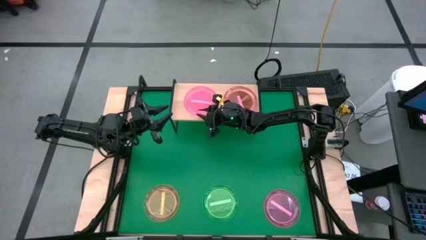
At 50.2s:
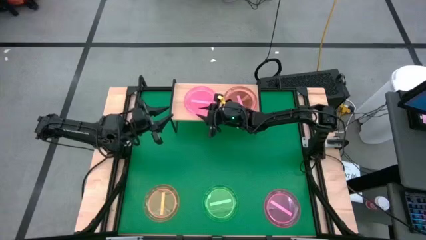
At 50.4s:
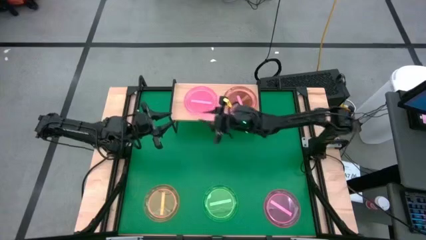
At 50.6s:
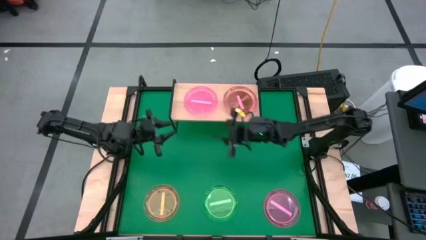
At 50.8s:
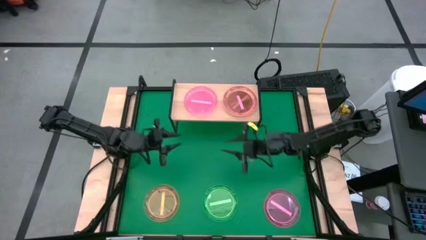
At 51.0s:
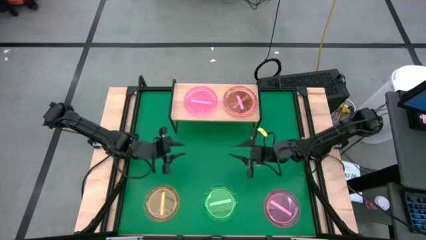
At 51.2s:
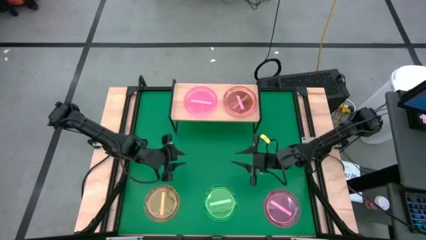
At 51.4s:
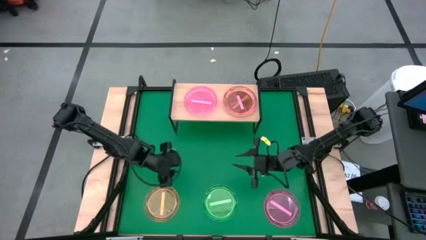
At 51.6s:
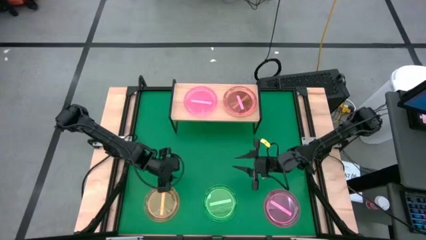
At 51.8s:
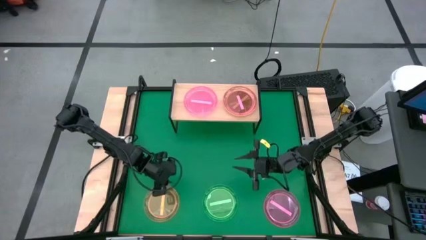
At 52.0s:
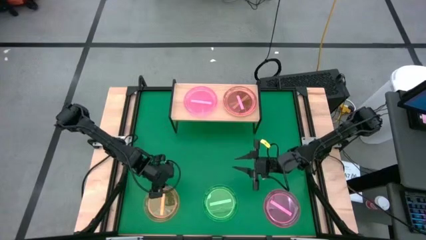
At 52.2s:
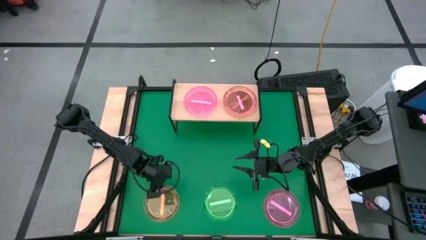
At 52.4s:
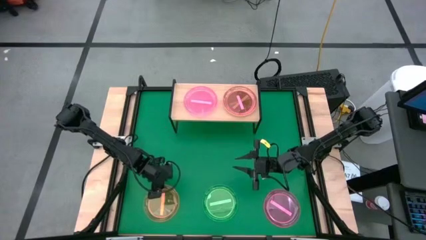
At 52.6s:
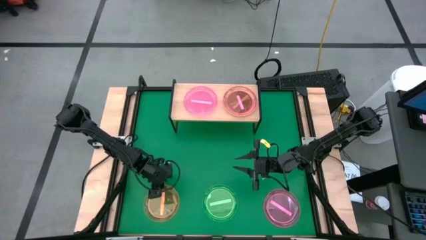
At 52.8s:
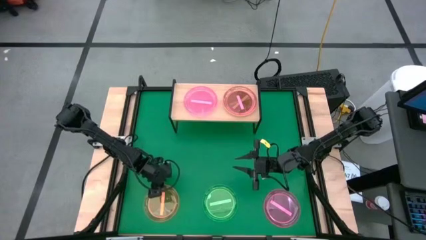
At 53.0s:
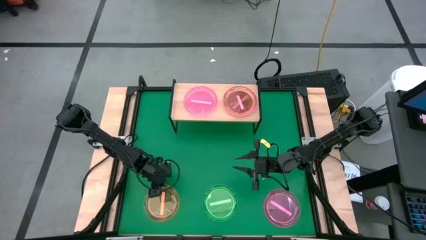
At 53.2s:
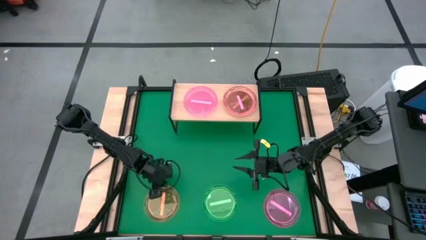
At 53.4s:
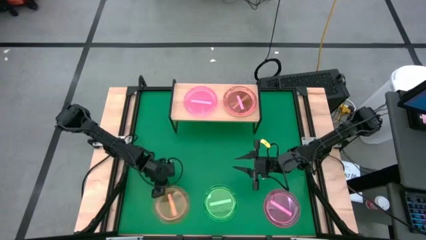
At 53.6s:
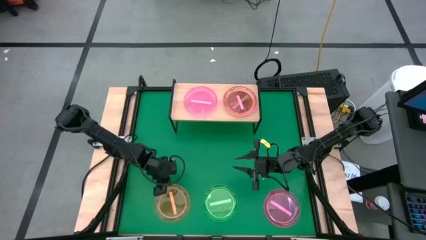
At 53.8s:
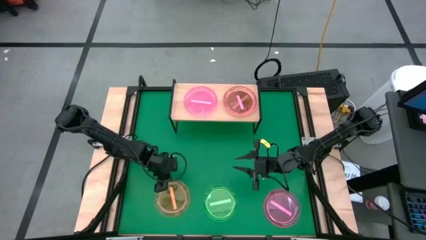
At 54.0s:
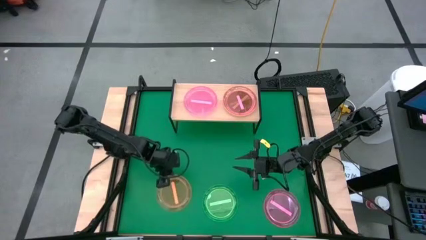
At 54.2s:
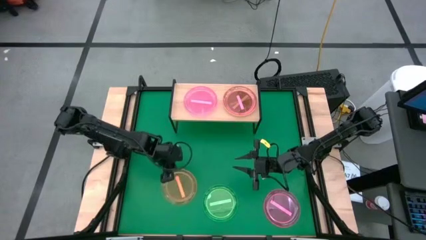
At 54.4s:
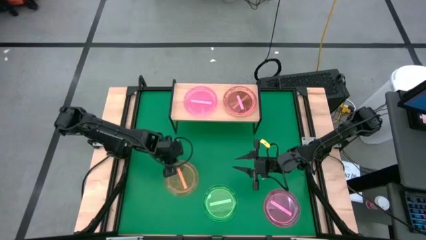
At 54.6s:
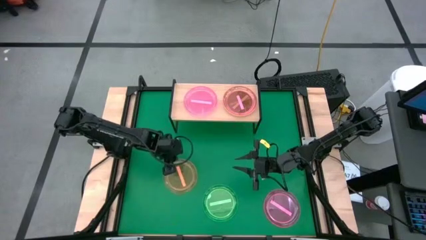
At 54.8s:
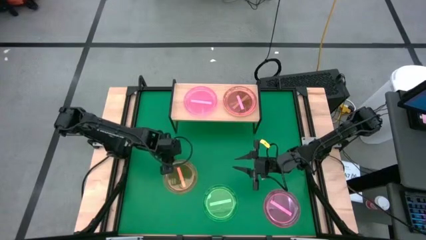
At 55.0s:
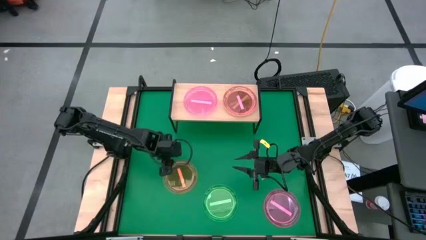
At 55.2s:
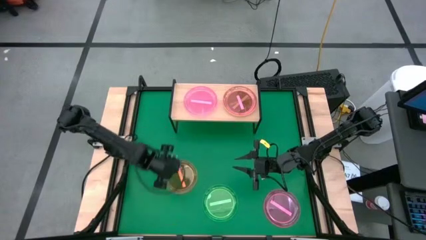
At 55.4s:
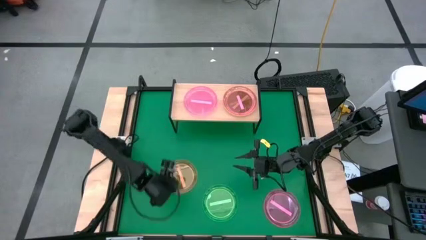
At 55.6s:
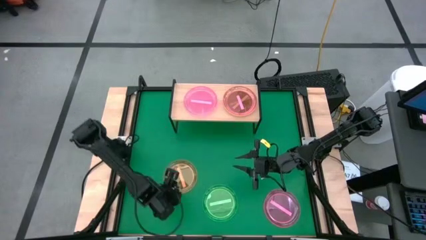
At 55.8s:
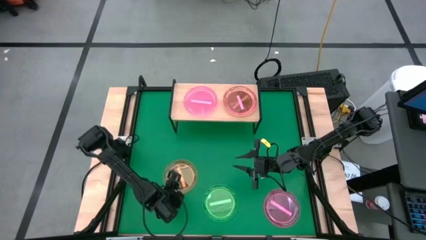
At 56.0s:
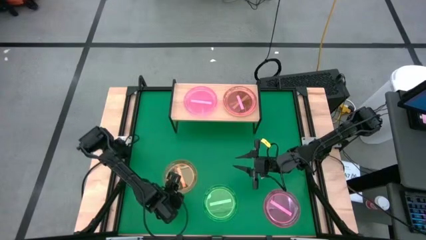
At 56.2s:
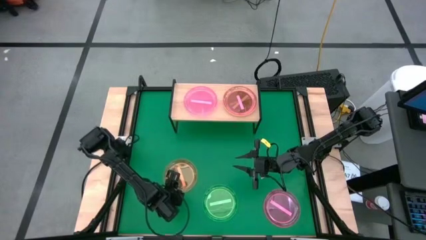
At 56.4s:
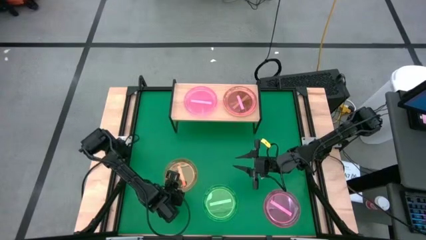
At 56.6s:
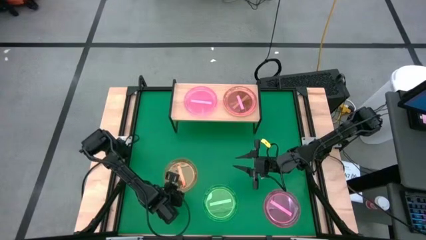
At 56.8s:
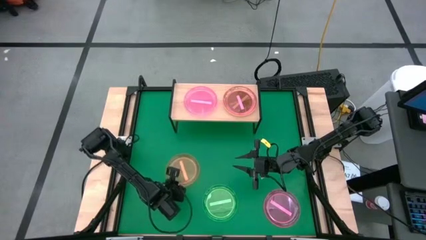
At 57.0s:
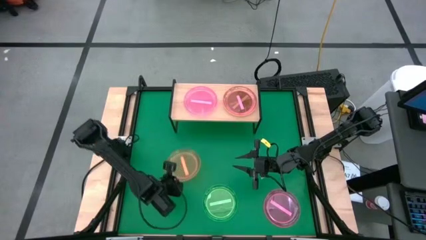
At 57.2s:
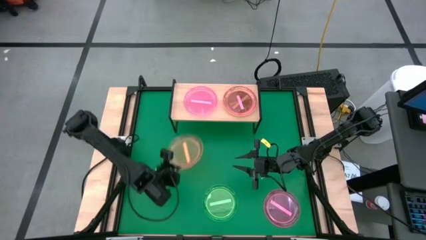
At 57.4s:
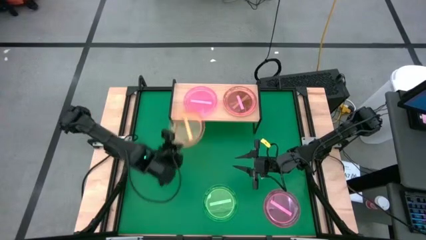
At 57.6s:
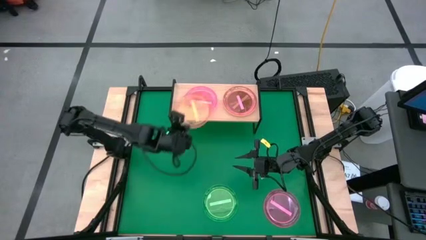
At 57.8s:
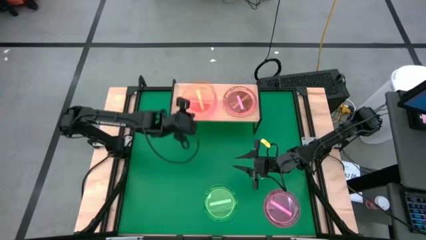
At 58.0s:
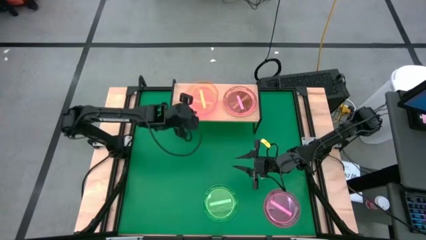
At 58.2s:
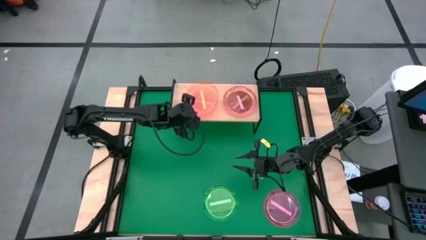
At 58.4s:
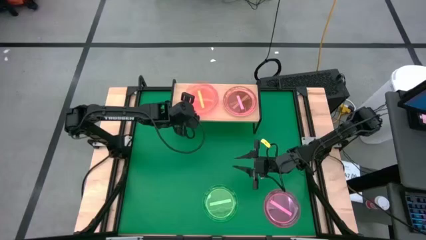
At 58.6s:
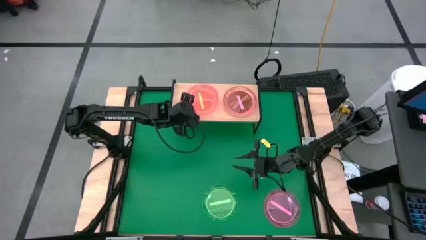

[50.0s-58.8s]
Task: Place and stack plates onto a shelf
Stack the orange plate on top of the pink plate on the shelf

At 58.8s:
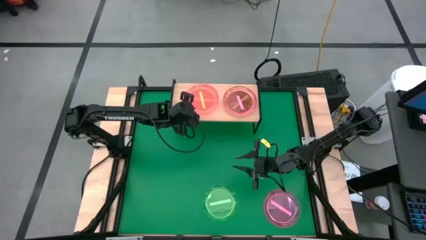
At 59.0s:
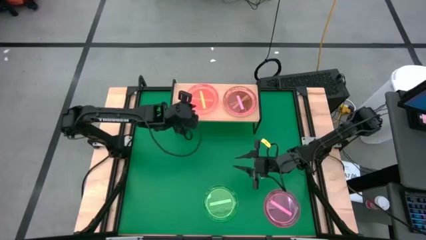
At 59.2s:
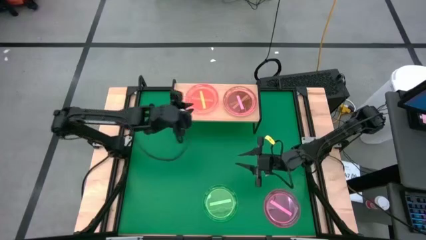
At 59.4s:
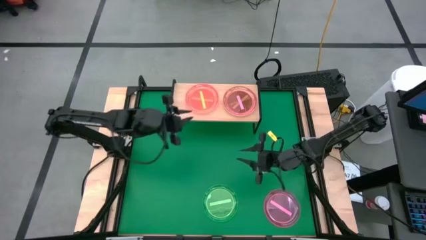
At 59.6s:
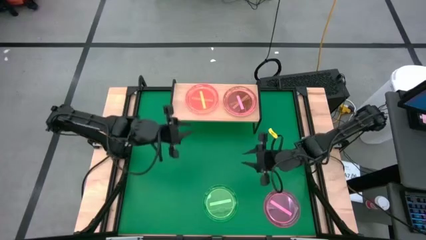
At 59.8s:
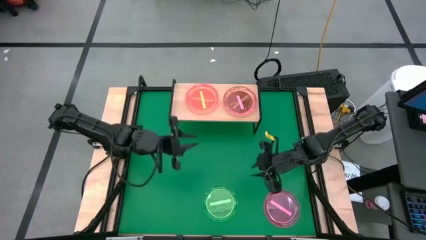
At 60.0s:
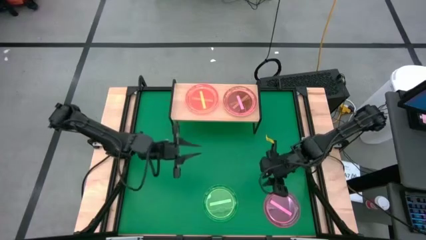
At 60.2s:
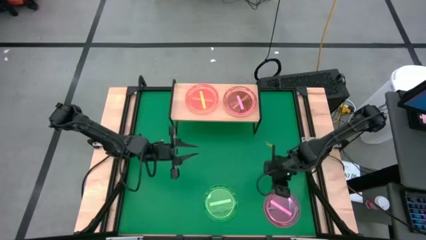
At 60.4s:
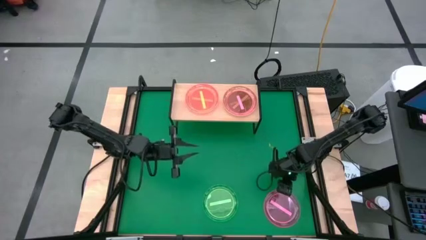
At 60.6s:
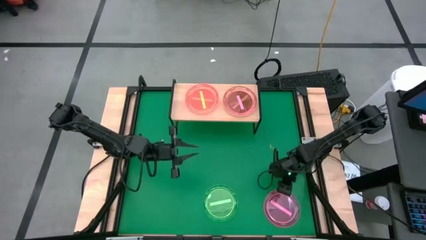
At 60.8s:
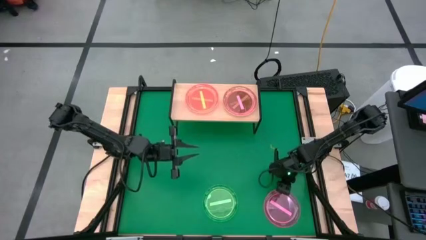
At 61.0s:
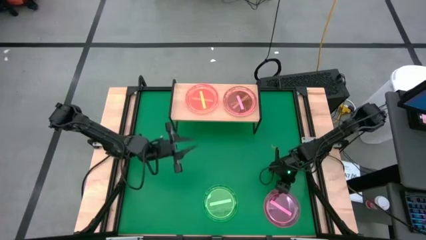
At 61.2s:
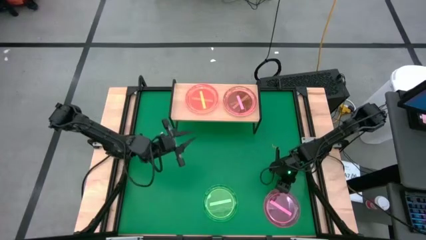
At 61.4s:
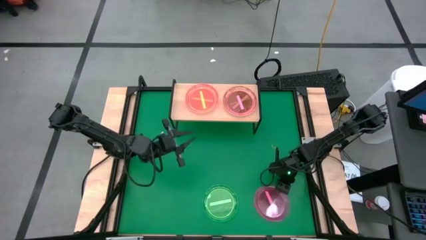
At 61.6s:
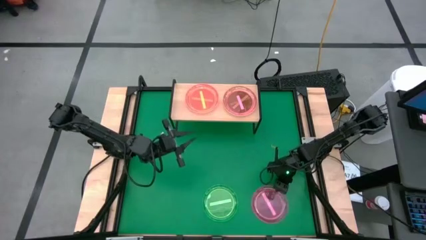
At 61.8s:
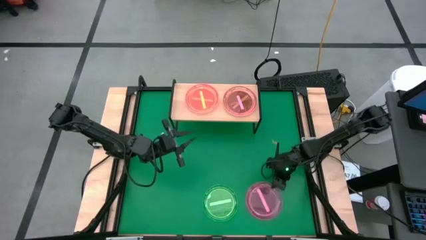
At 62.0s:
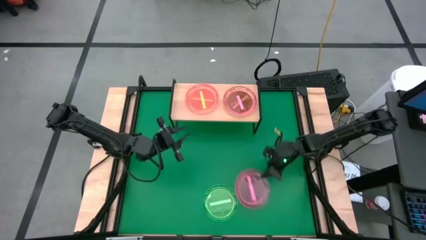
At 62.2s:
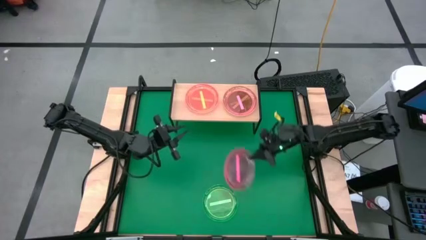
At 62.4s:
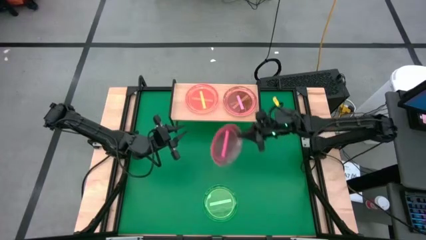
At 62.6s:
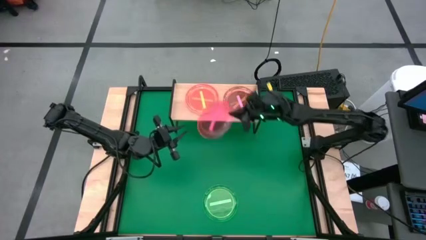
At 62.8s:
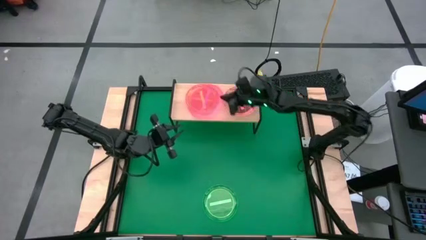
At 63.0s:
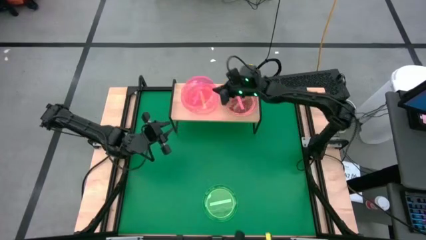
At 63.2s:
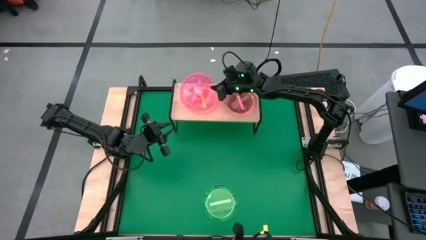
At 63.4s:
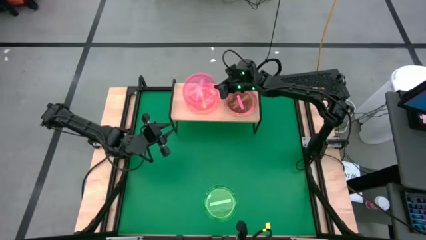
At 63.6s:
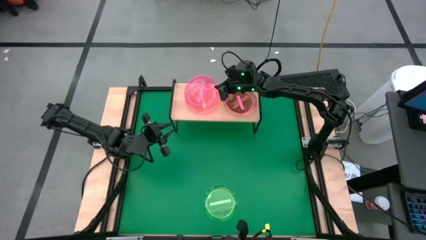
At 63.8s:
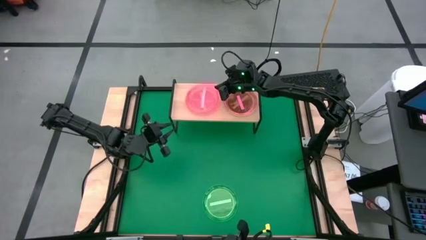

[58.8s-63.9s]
Stack the pink plate on top of the yellow plate on the shelf

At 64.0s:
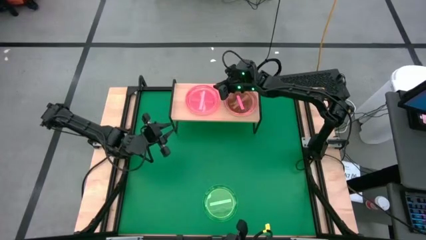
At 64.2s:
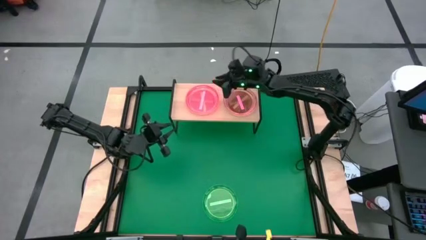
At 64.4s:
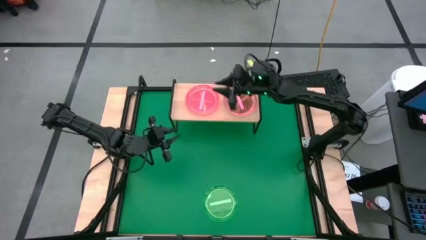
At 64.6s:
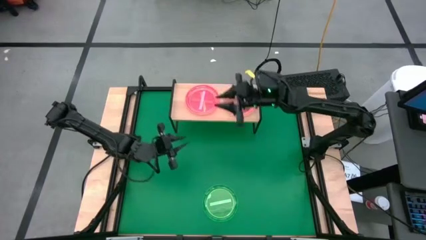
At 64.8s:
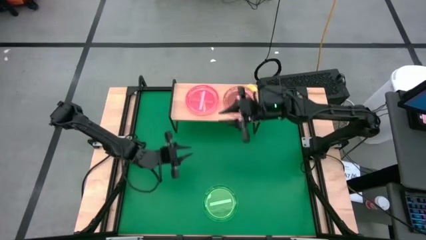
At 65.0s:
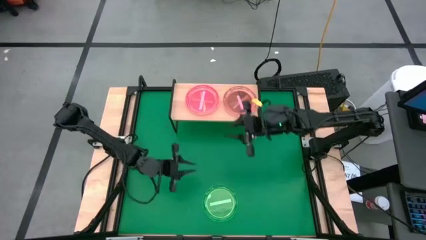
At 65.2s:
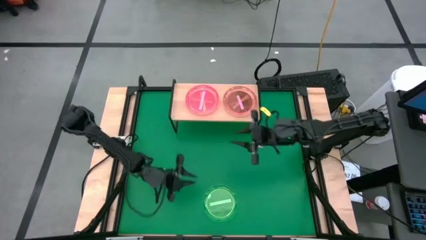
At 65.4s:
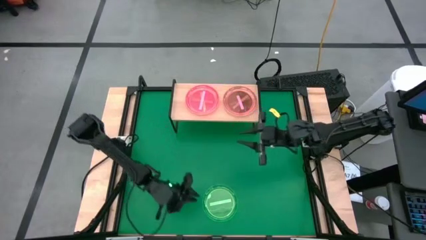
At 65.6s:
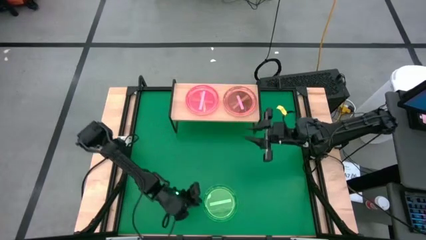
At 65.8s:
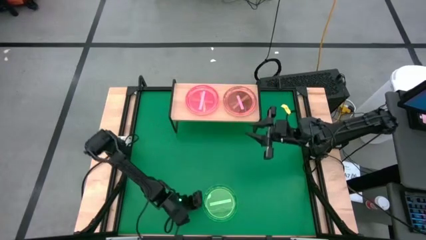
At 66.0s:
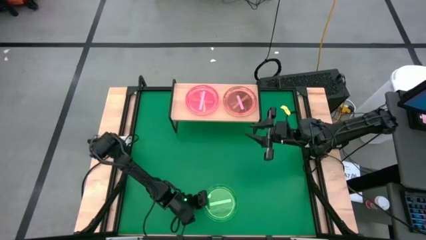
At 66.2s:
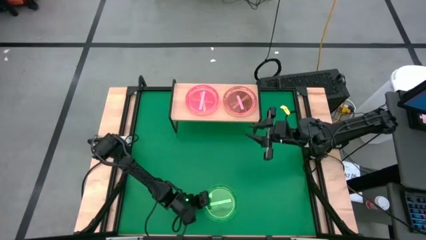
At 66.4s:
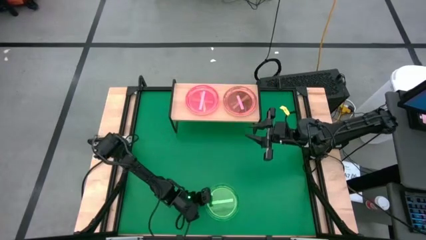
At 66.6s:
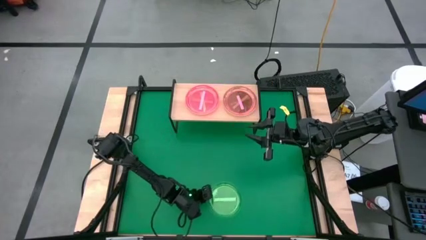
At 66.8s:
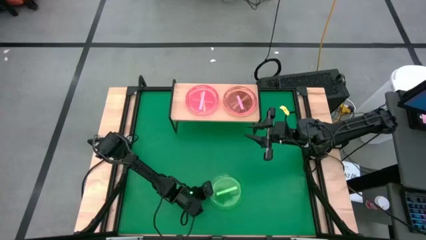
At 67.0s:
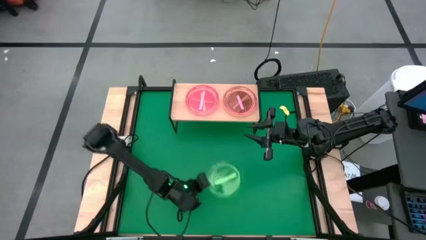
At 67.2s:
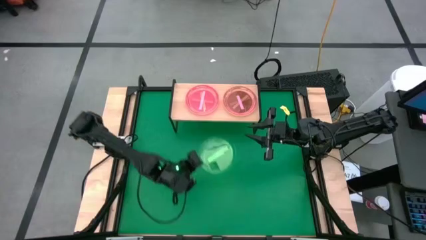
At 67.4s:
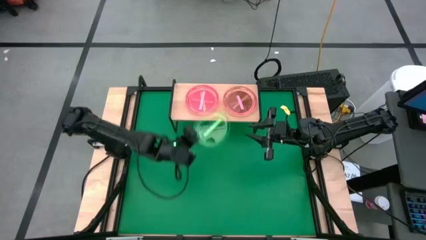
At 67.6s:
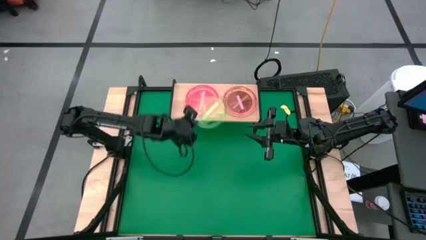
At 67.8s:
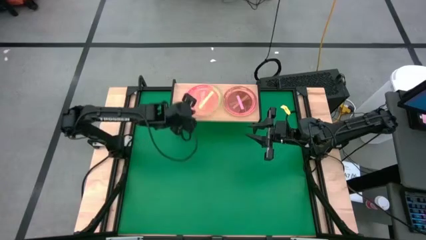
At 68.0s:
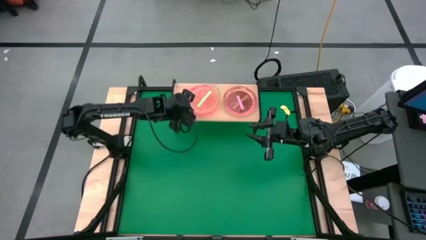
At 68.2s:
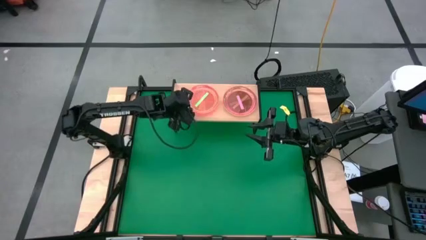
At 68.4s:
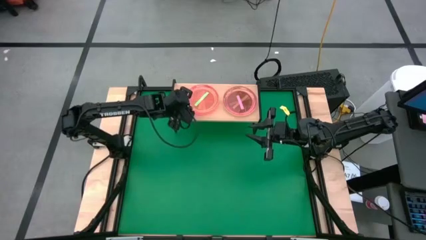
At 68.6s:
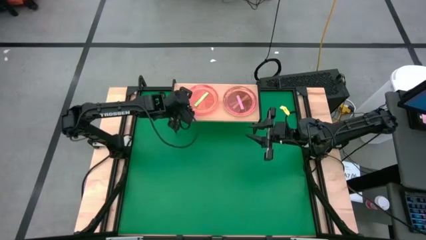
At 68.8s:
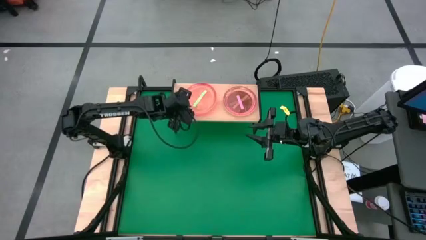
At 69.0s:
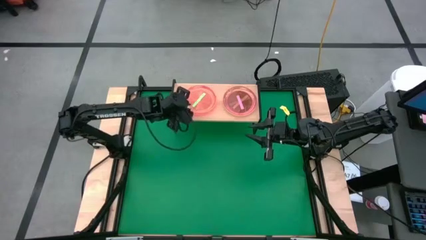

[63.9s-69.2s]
Stack the green plate on top of the pink plate on the shelf
